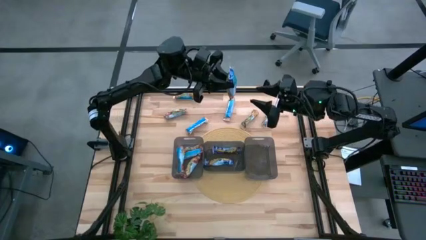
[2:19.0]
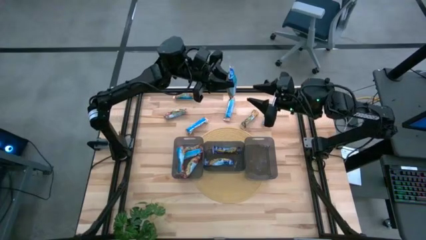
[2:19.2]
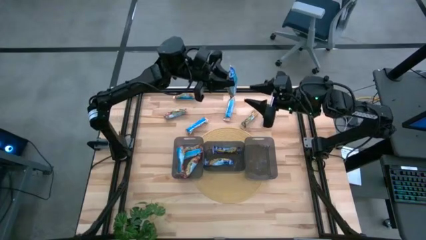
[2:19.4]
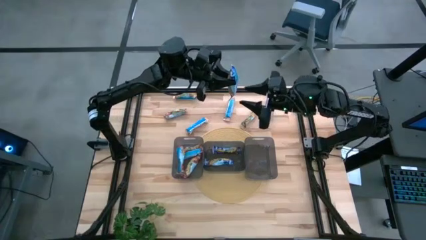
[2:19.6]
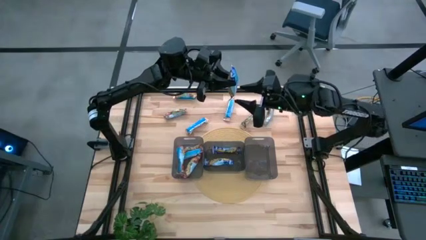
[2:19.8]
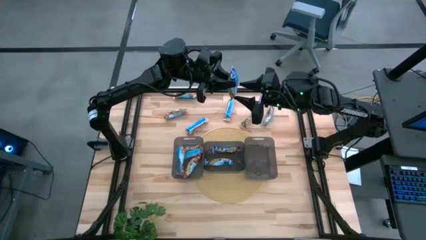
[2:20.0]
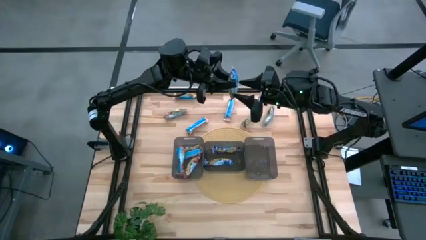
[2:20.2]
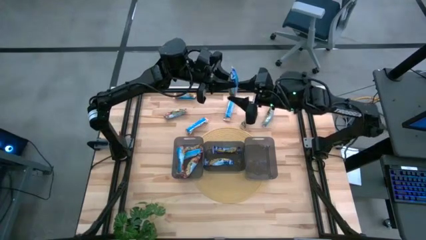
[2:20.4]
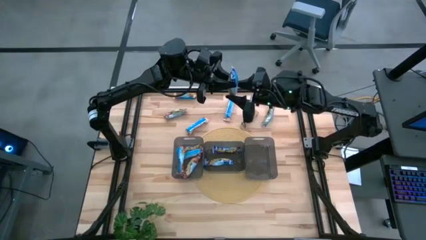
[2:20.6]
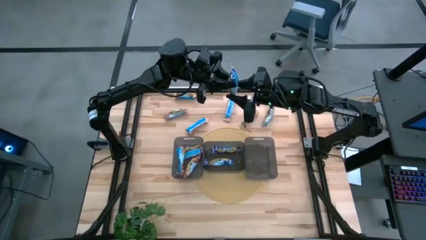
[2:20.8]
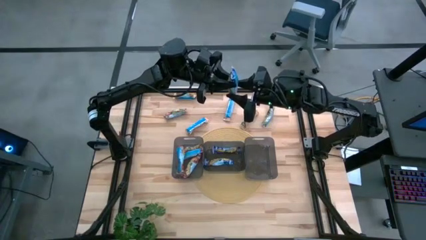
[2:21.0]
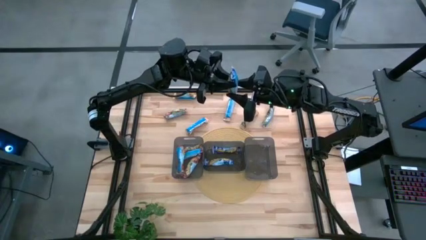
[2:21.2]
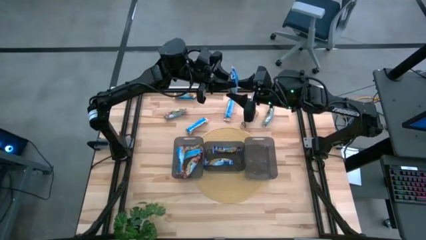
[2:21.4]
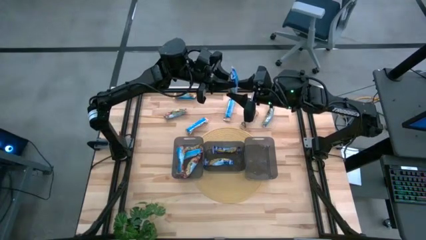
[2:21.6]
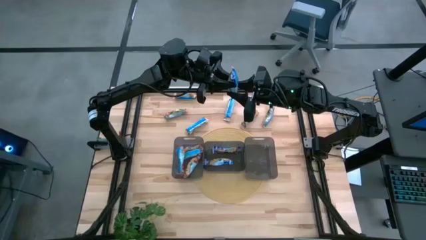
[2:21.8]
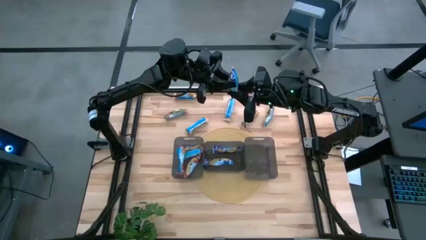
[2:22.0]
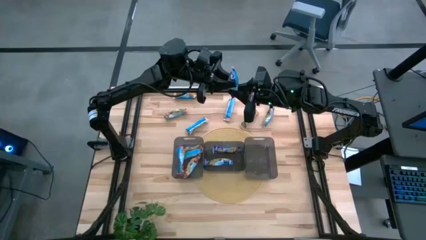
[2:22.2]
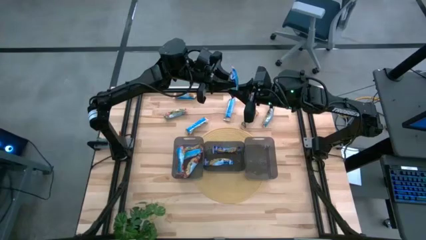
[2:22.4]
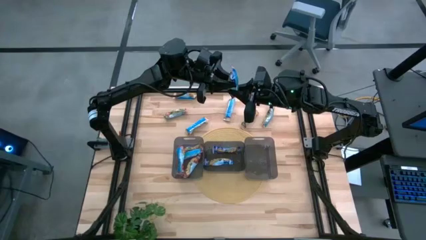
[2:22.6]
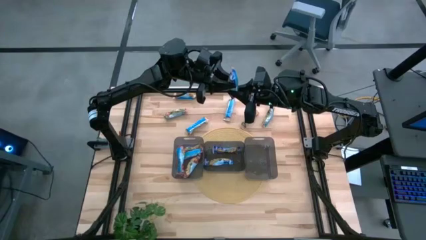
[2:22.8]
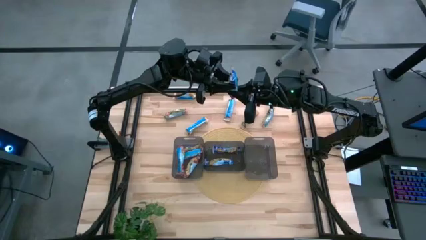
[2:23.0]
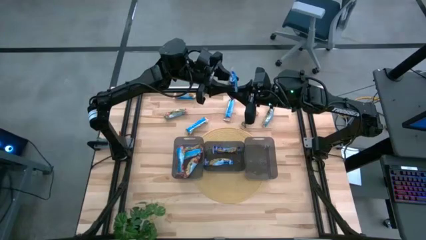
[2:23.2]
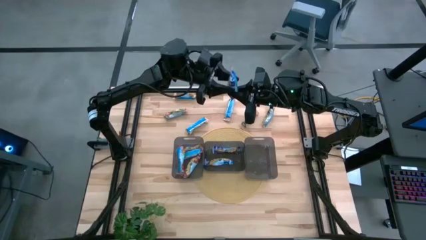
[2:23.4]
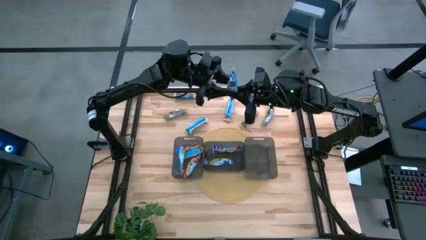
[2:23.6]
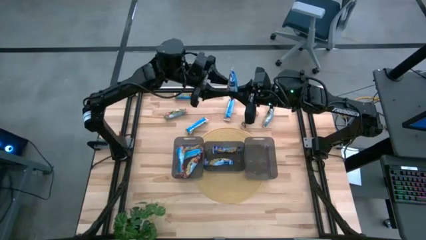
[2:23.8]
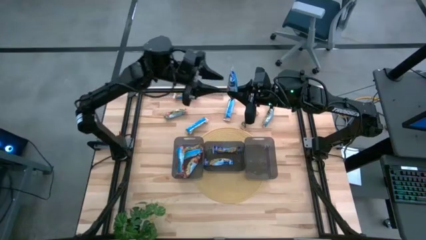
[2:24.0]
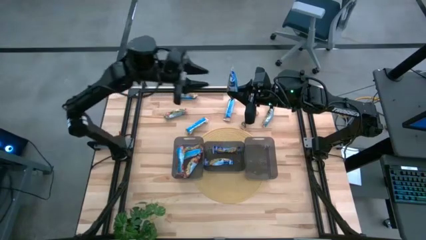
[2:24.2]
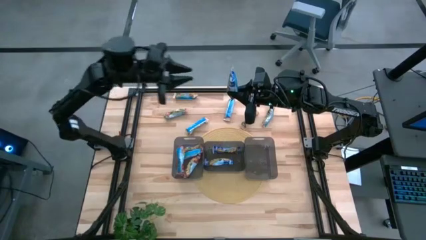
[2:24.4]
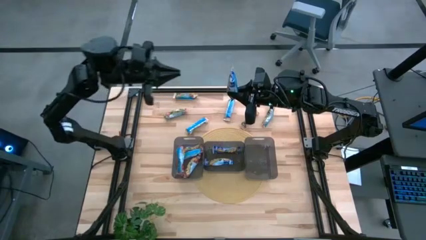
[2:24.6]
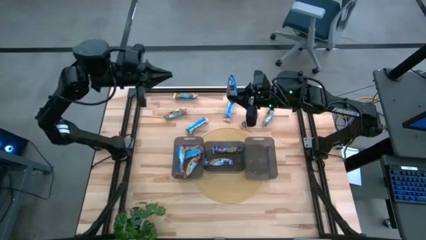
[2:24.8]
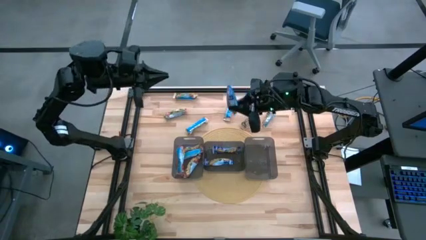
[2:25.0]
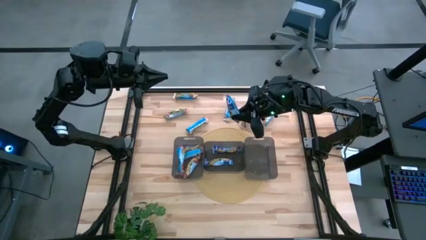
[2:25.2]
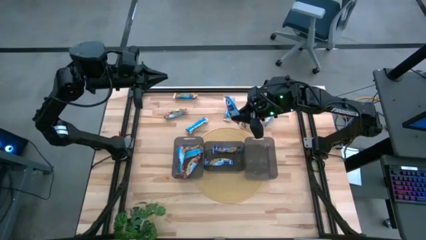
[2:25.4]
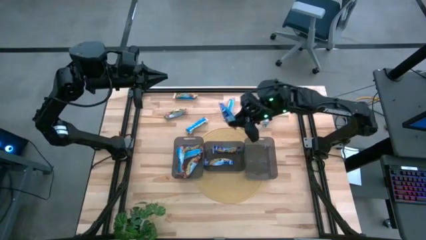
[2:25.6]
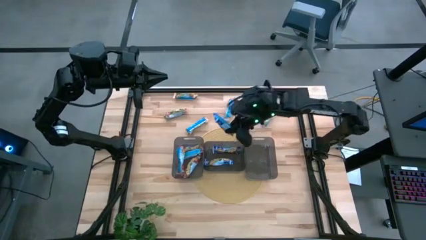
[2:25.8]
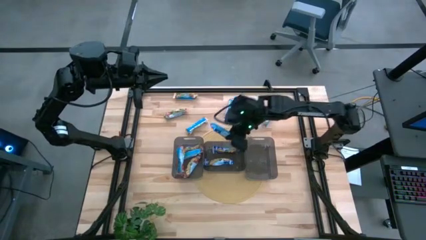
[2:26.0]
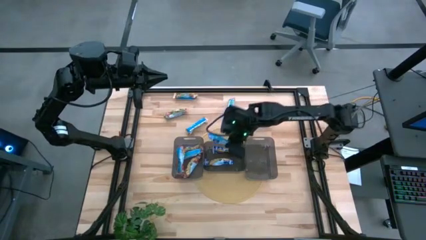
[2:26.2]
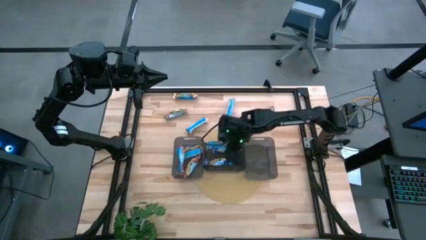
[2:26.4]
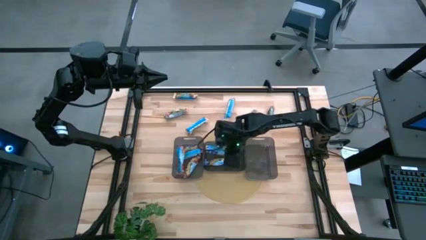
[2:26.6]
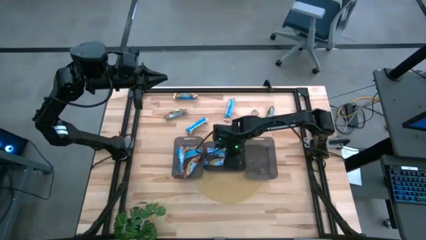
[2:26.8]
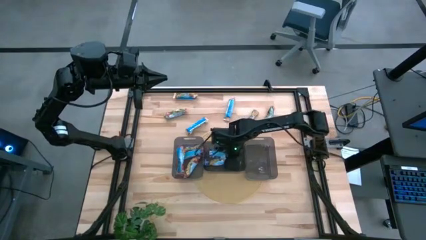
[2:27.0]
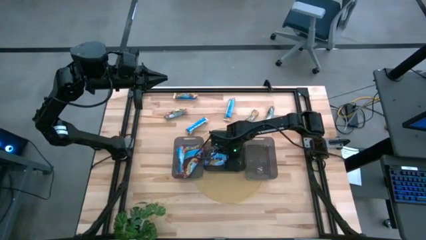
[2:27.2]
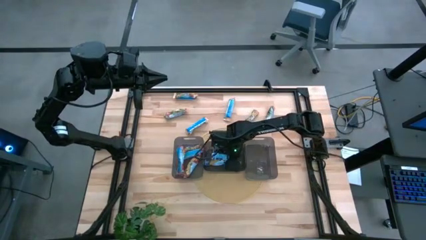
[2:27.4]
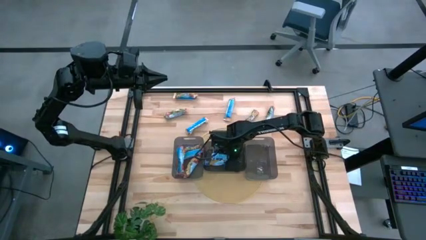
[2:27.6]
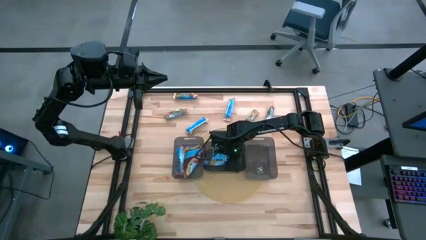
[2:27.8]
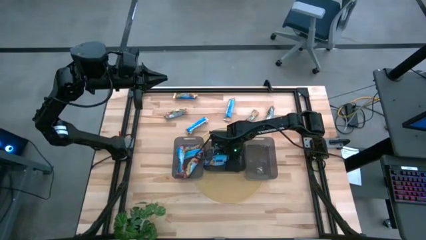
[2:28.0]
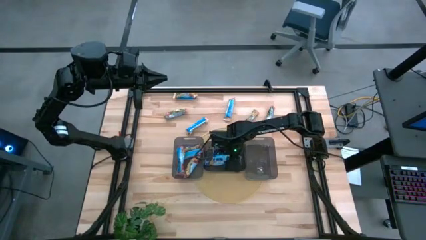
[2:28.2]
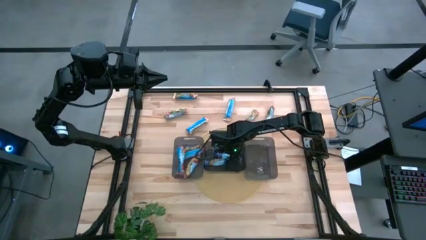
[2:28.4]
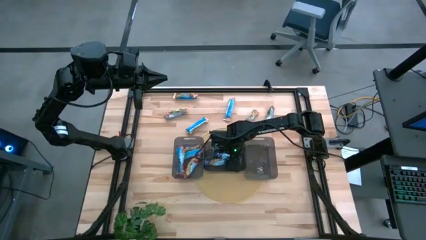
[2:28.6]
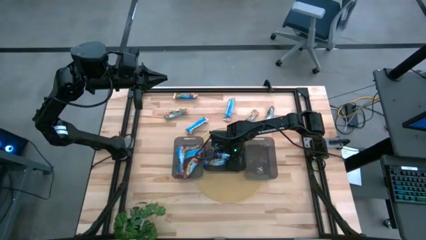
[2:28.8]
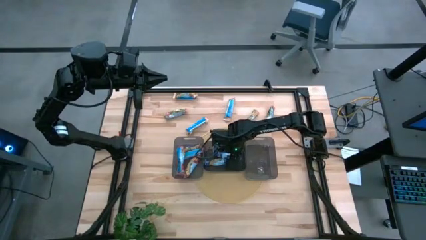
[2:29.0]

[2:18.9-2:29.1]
Task: Pick and place Granola Bars by type
Put the blue granola bar into the center black bin

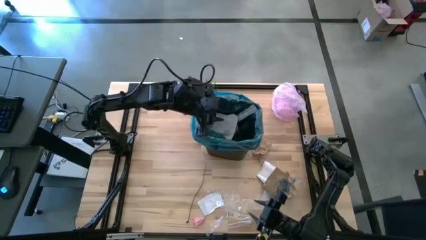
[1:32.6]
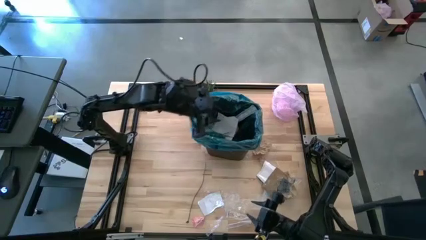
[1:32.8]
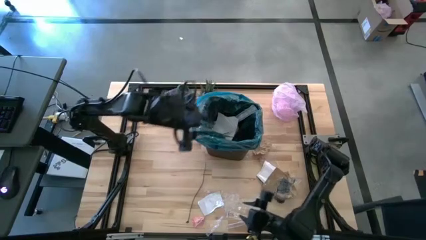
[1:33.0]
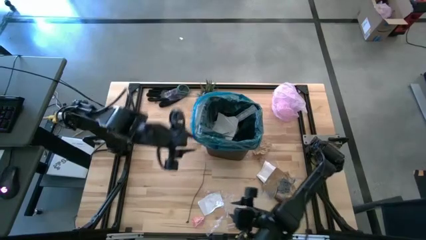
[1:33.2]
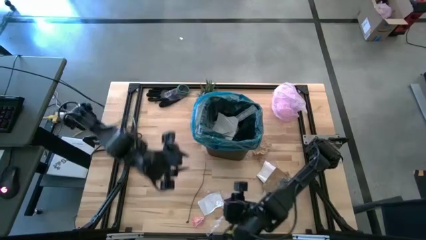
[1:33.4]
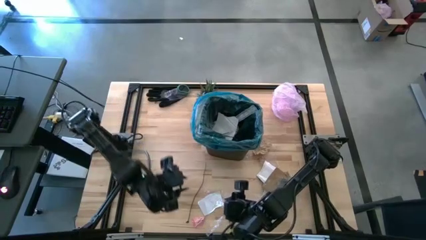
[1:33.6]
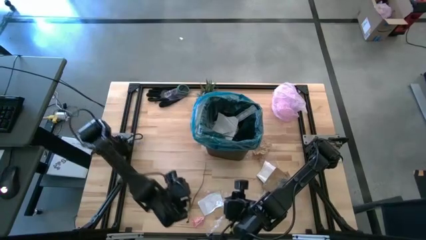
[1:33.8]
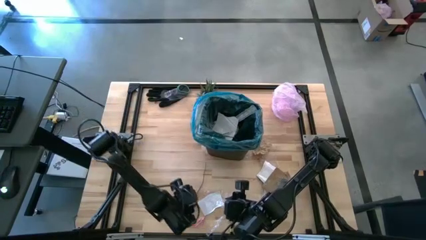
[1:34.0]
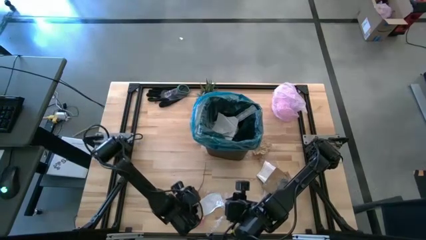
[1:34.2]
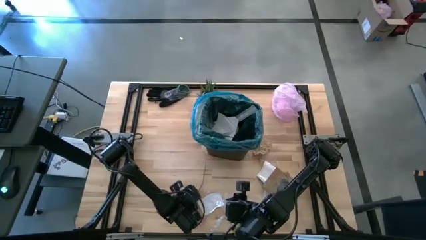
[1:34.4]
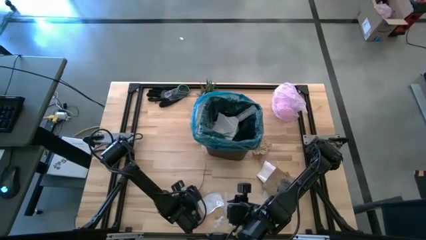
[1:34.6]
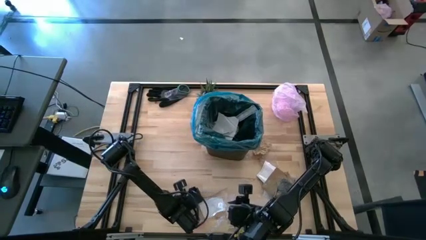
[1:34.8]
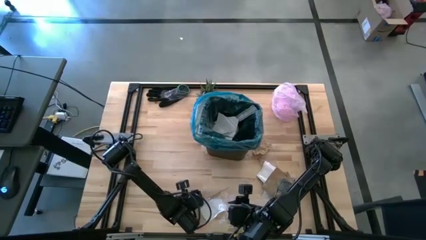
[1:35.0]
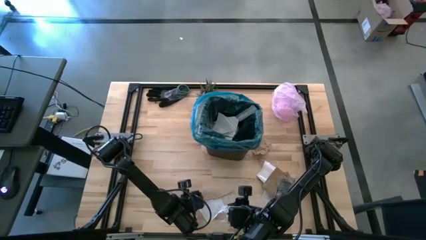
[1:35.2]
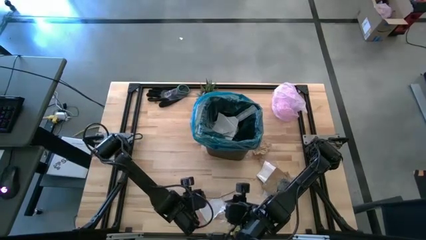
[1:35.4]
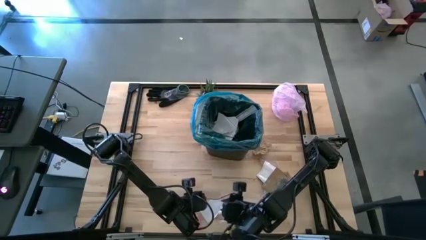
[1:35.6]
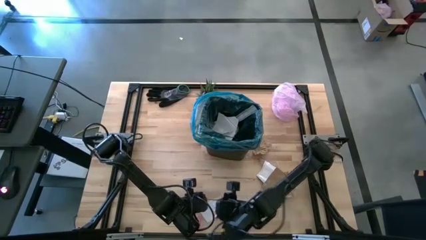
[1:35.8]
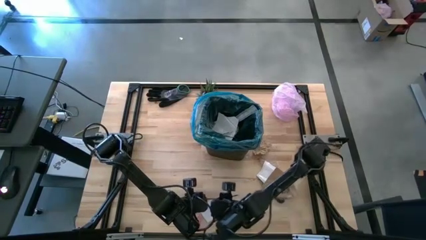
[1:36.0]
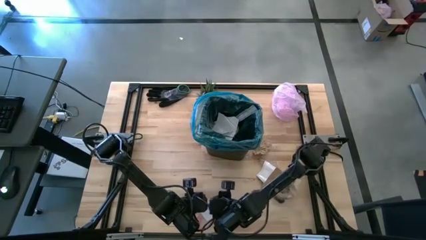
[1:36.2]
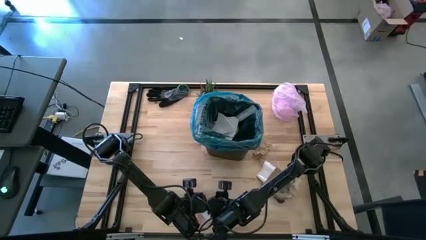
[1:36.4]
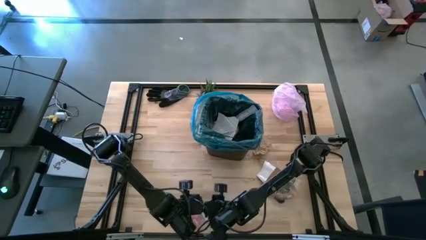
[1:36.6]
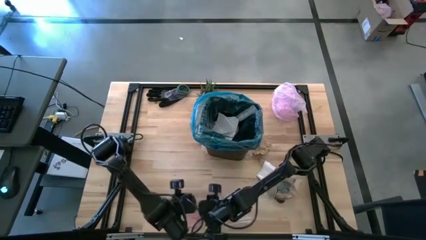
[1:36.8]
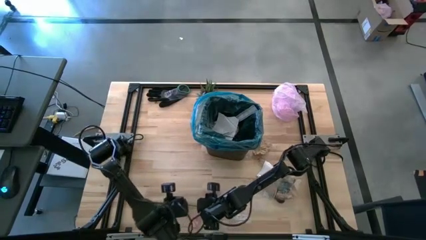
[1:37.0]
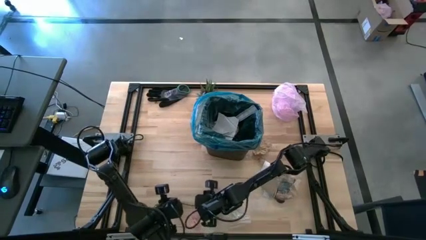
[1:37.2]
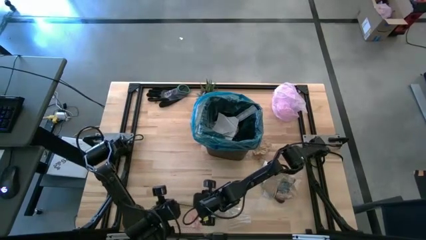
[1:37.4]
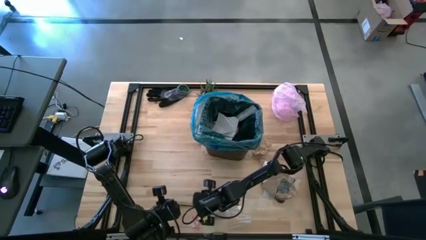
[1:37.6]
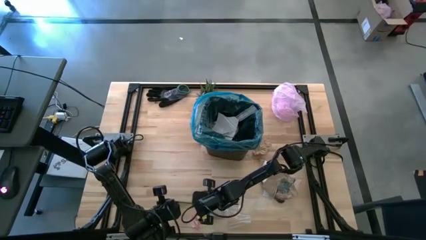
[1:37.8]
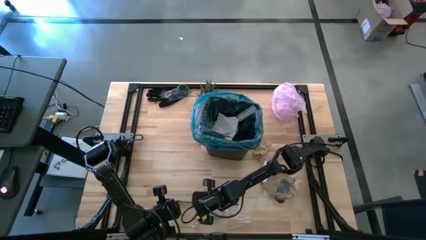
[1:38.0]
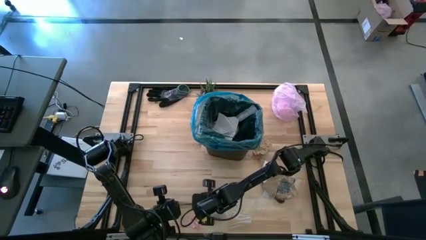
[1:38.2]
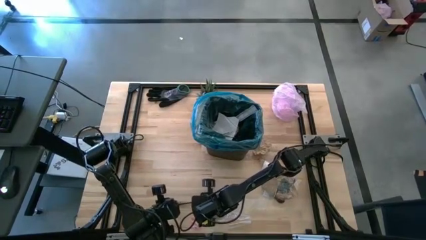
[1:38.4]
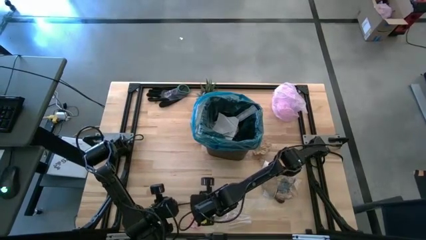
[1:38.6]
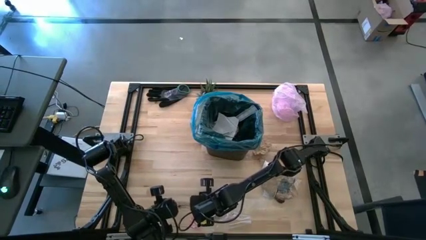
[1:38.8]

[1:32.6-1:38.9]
Task: place trash/remove bag and relplace
Put the black zip tie into the trash bin
